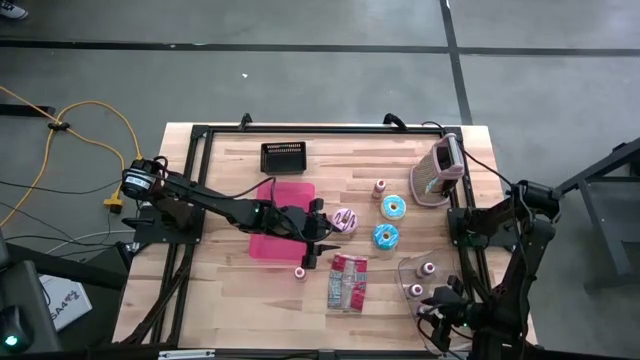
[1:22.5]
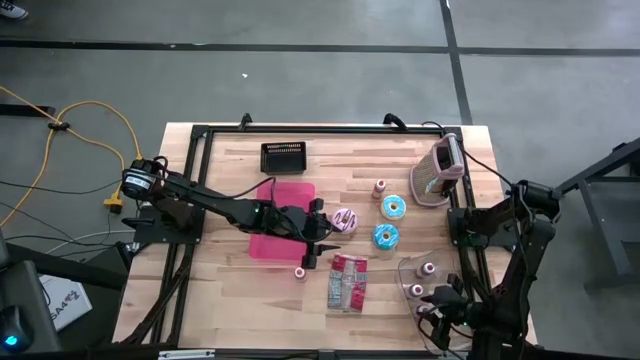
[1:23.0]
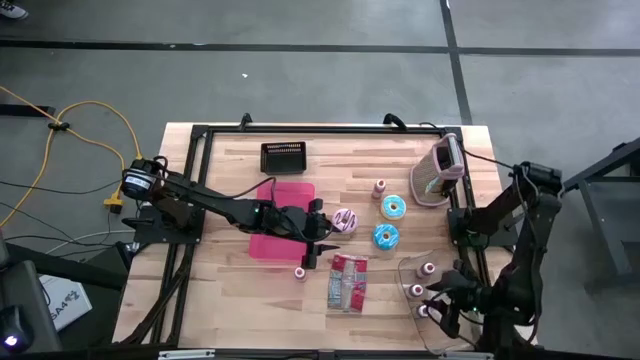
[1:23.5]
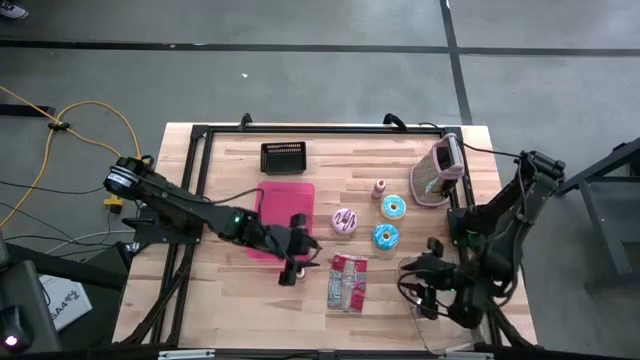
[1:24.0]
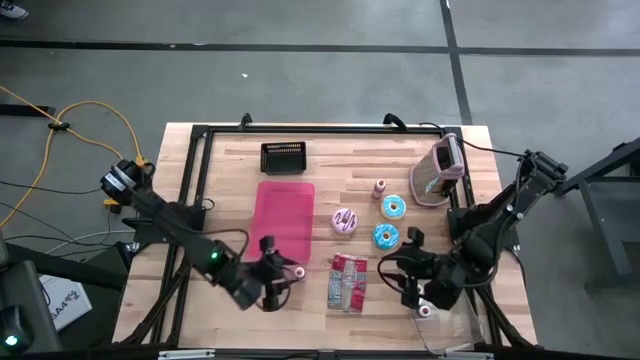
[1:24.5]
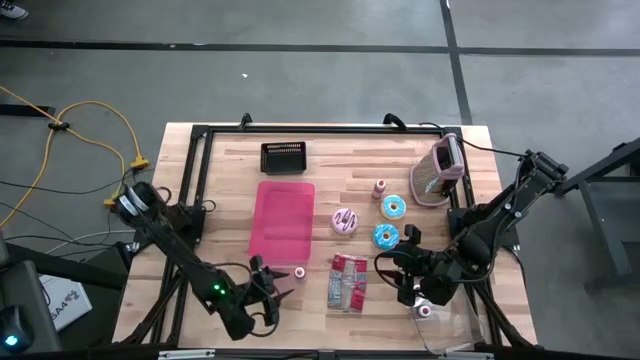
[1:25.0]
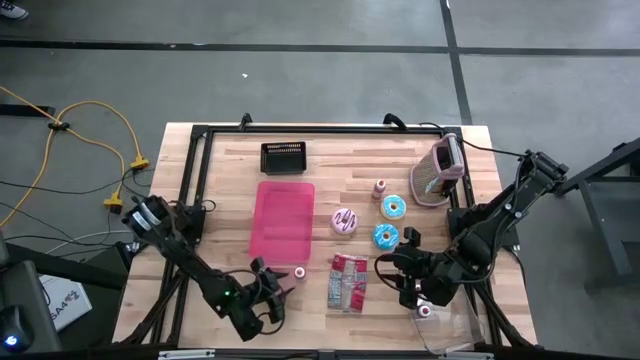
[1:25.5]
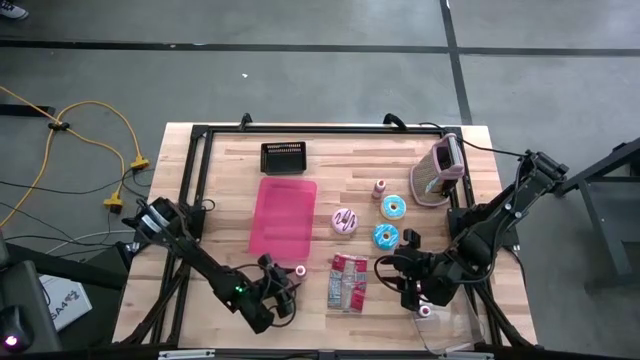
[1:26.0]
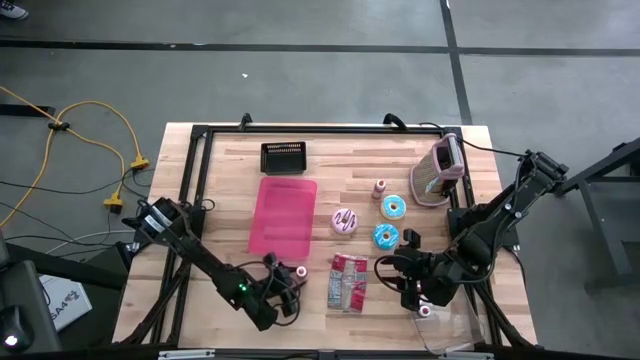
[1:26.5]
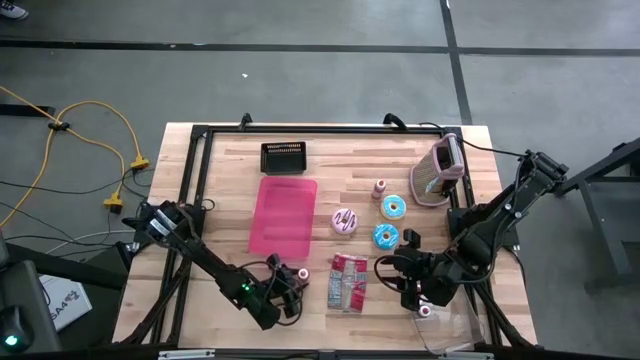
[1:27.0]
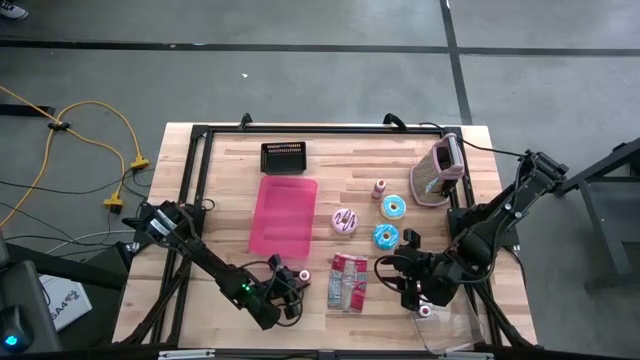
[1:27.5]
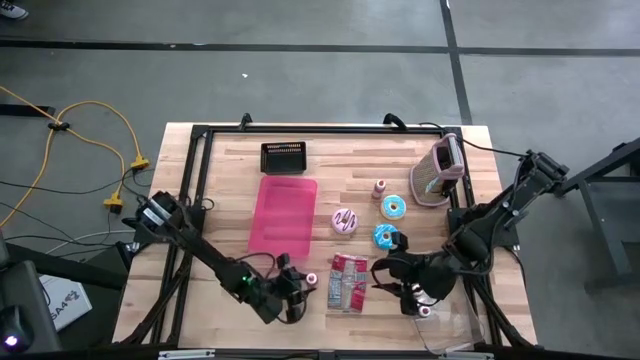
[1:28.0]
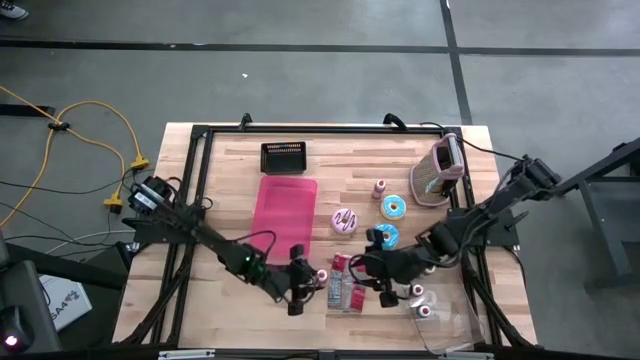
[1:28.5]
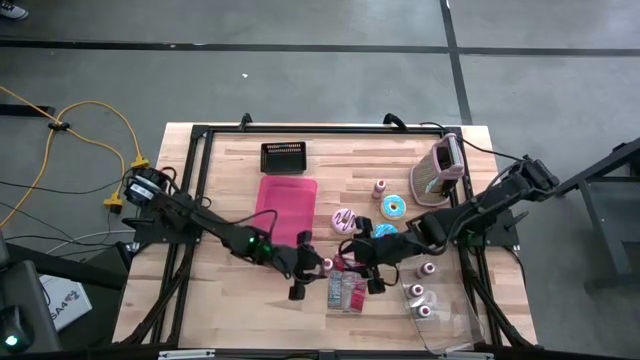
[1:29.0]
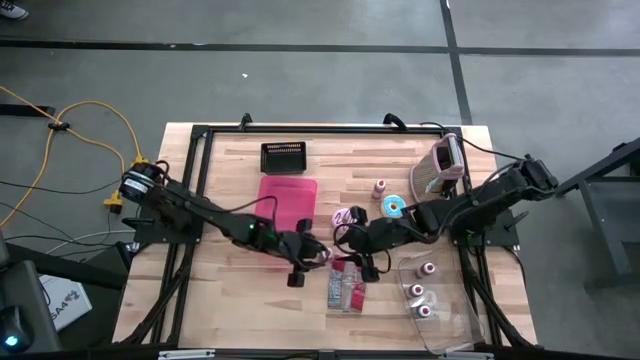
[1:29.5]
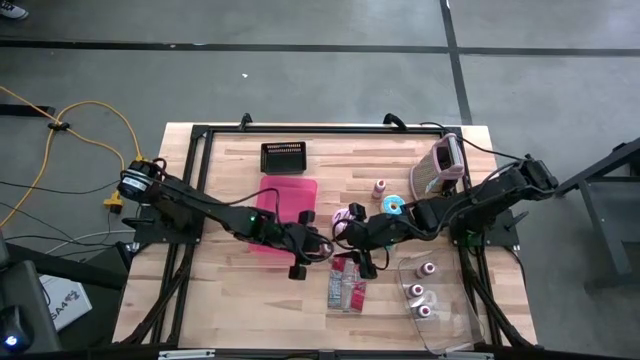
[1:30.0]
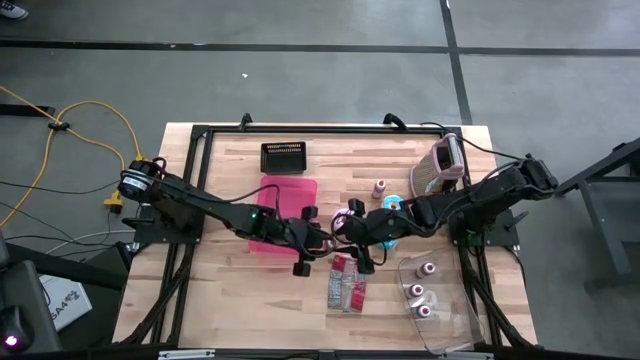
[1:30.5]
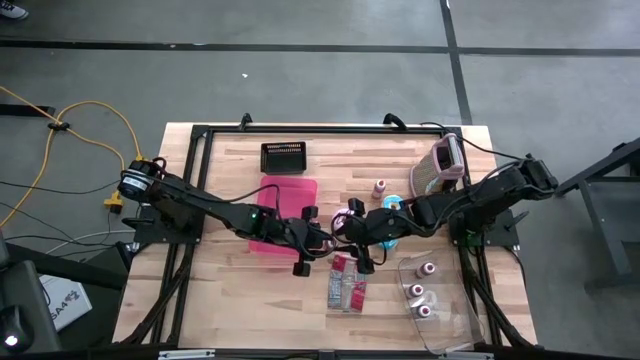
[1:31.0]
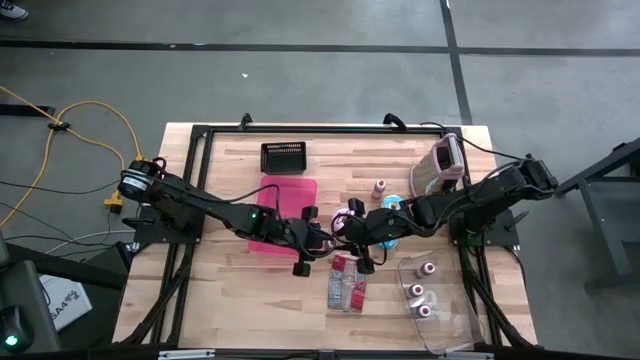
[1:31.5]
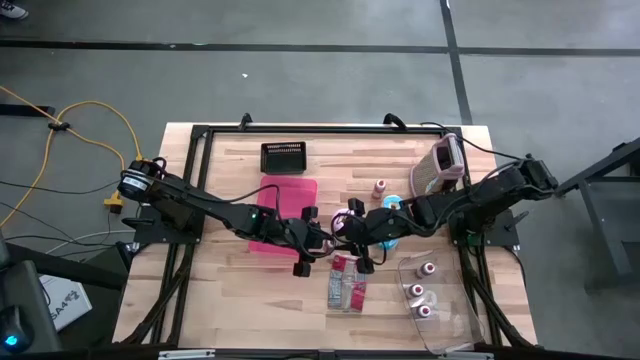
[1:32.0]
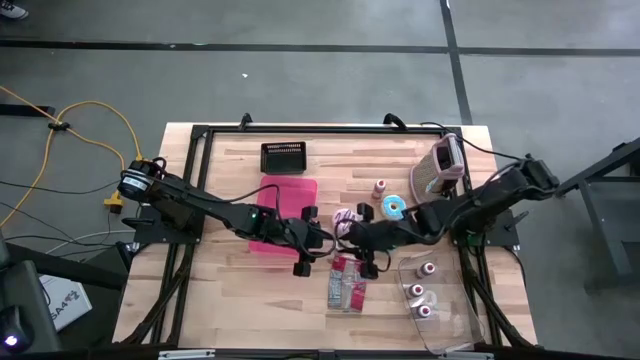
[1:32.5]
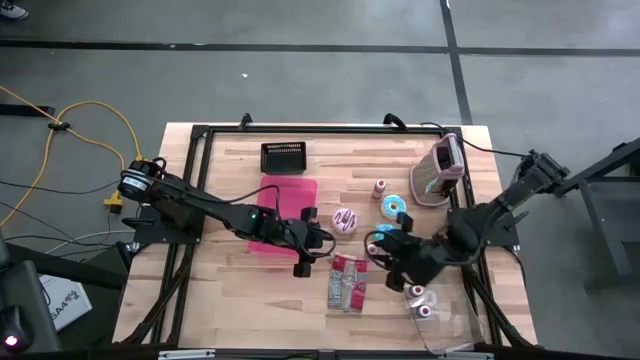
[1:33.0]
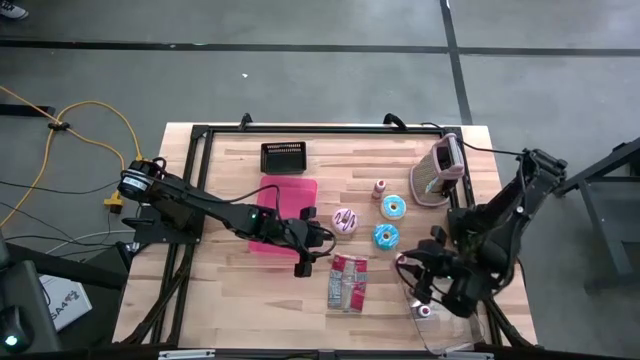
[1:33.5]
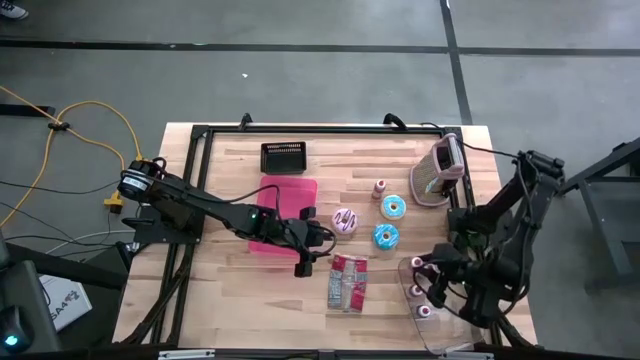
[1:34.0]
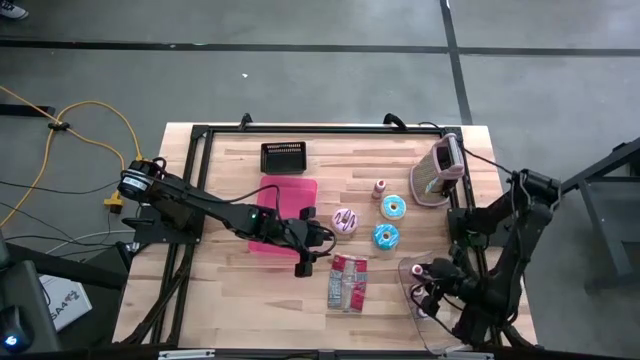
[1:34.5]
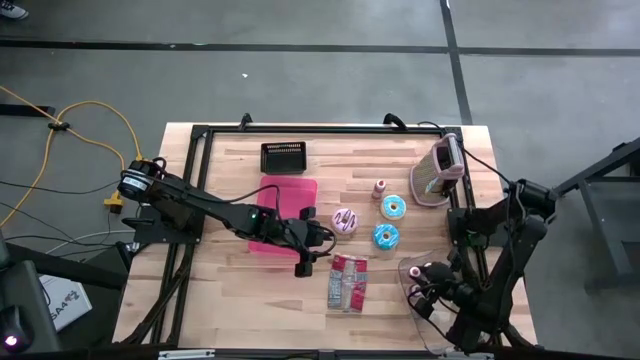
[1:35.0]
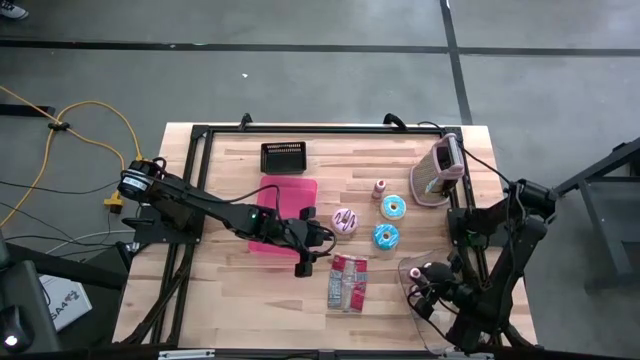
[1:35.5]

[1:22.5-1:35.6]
Put the bottom orange food coloring into the transparent bin

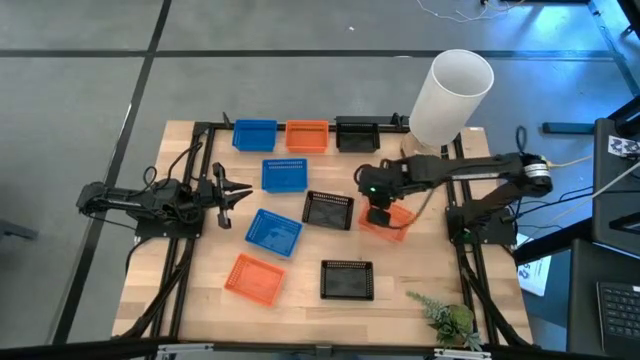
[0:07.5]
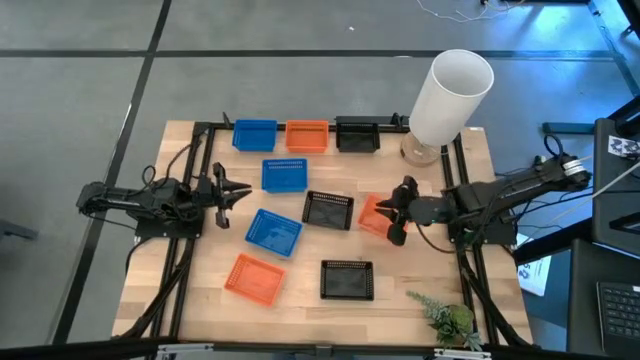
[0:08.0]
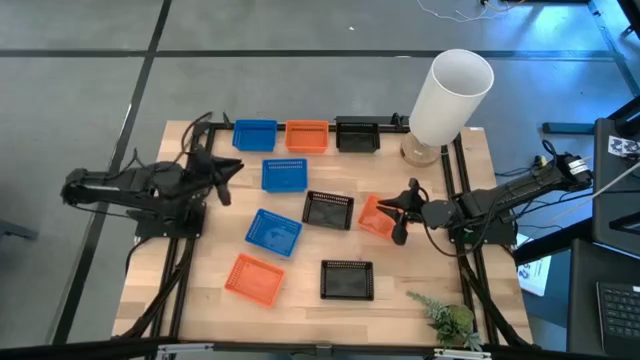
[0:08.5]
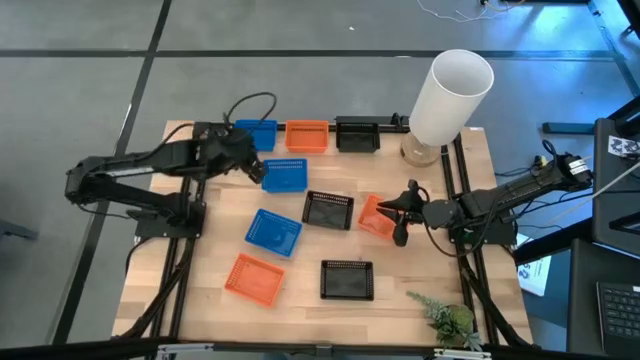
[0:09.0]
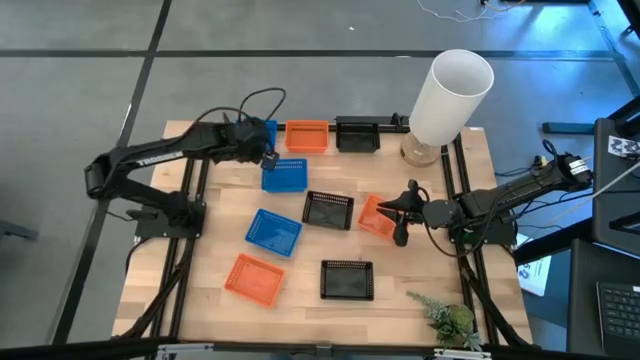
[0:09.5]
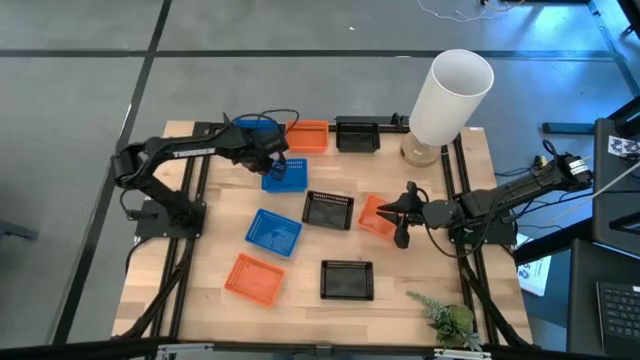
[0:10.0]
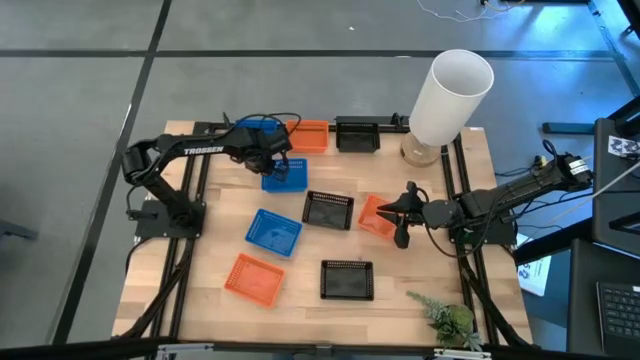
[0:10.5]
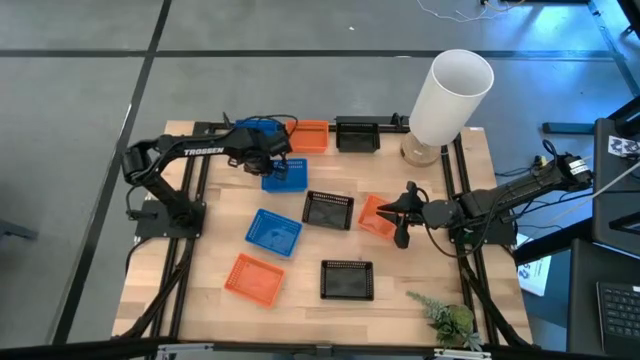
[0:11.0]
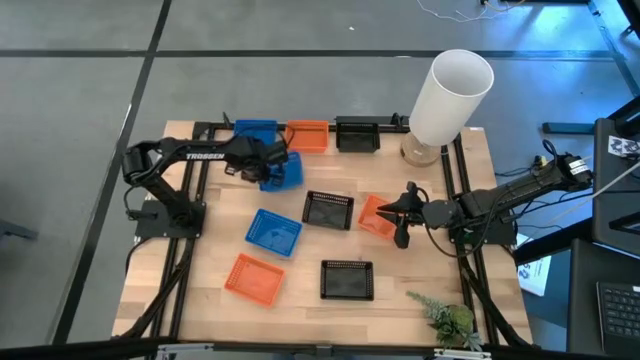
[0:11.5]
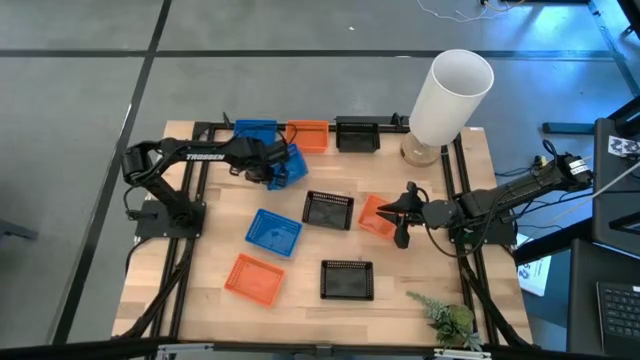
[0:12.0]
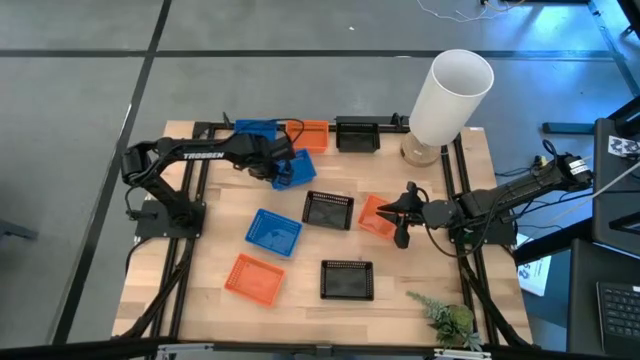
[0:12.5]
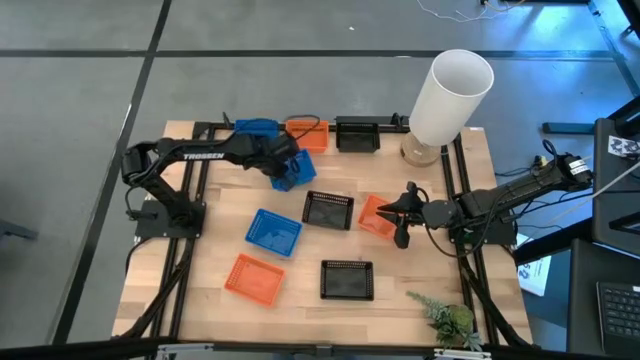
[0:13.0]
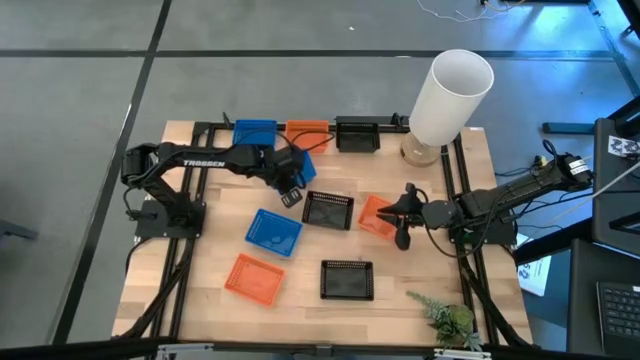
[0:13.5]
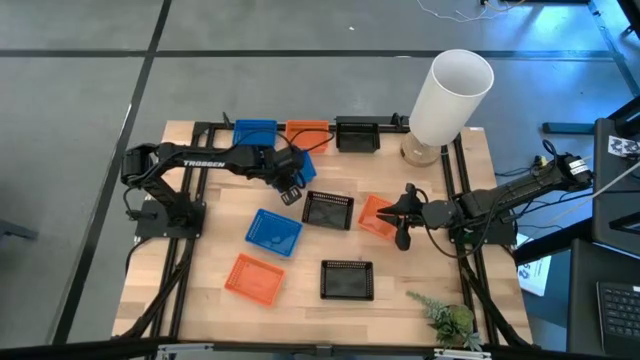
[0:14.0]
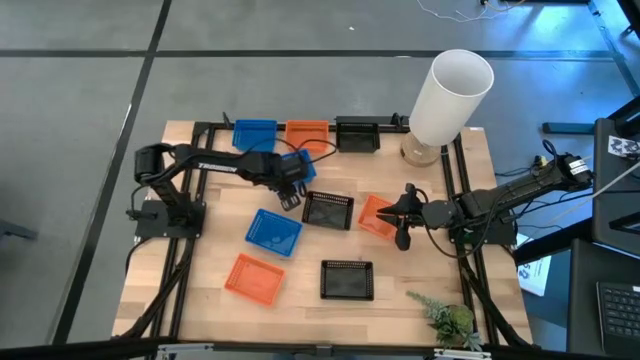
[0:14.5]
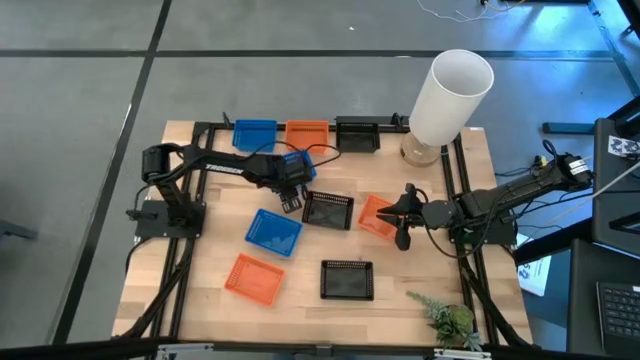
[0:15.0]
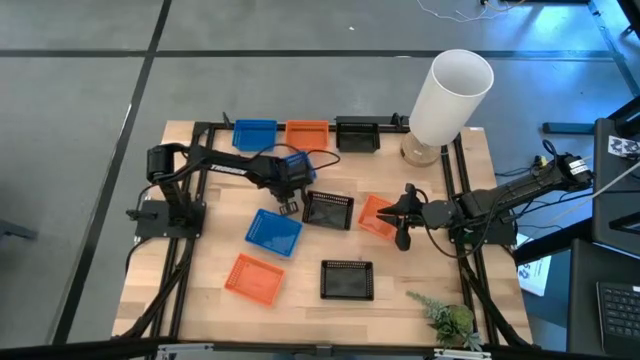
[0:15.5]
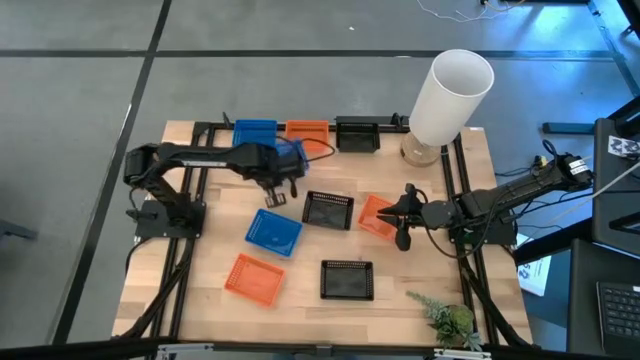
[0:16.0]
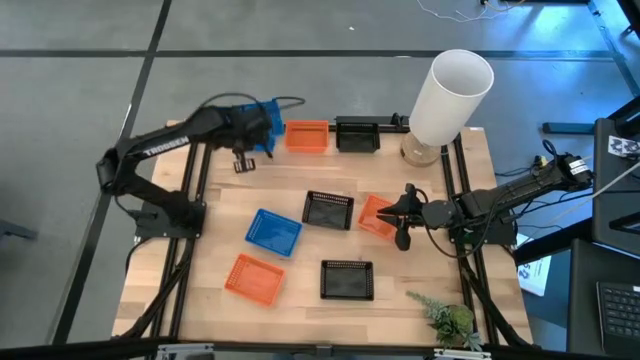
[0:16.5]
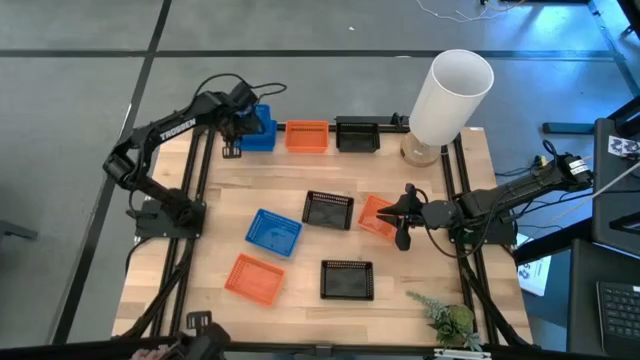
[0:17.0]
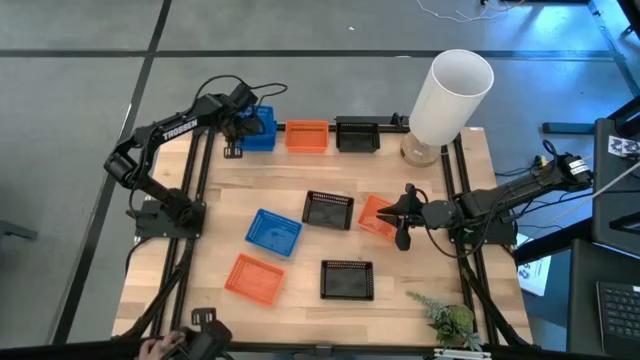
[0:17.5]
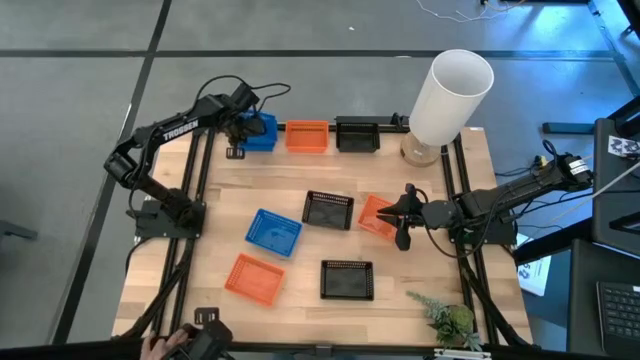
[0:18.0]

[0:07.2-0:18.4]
Stack the middle blue bin on the top blue bin
